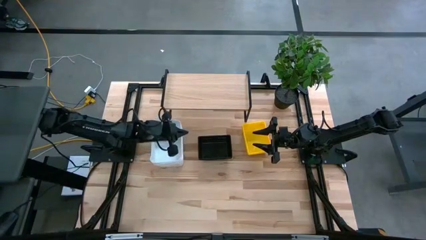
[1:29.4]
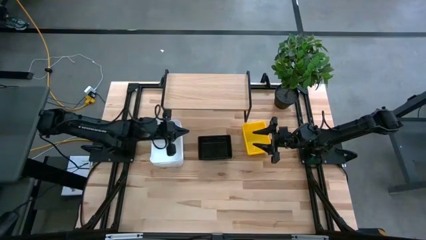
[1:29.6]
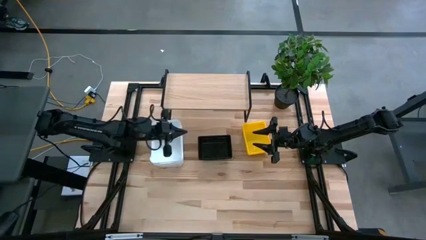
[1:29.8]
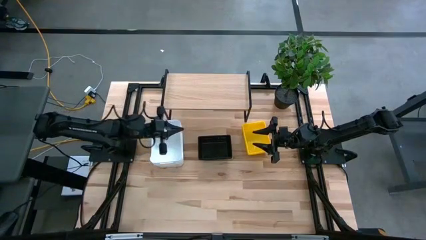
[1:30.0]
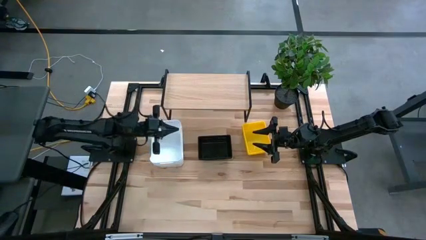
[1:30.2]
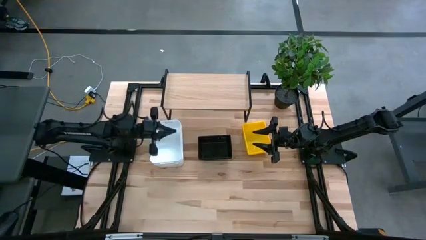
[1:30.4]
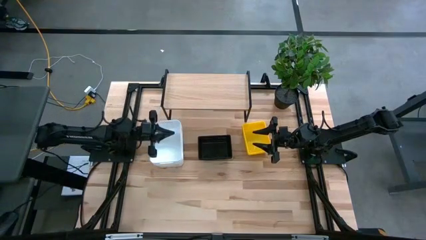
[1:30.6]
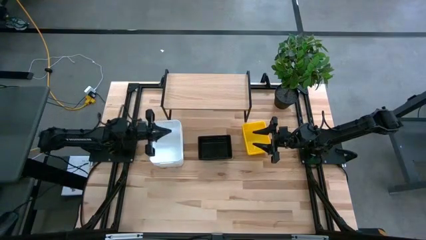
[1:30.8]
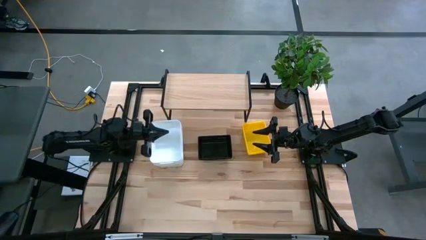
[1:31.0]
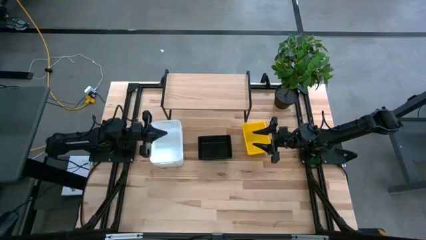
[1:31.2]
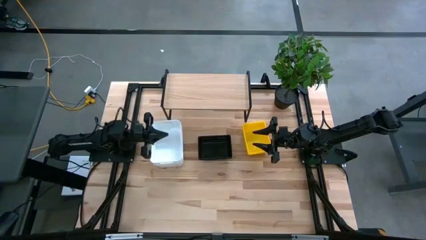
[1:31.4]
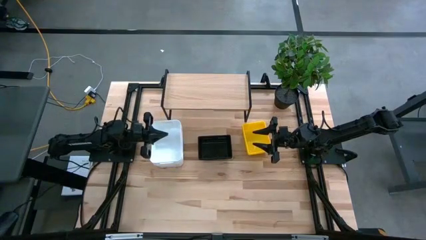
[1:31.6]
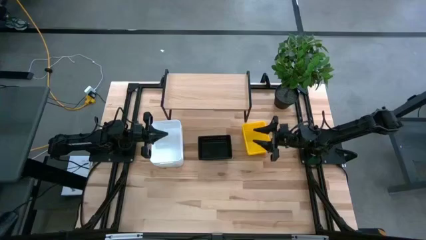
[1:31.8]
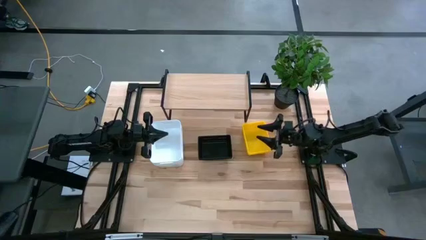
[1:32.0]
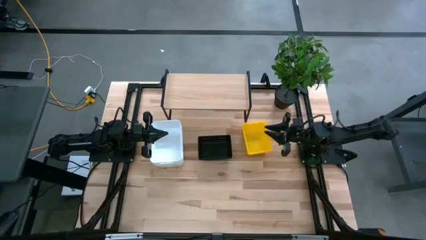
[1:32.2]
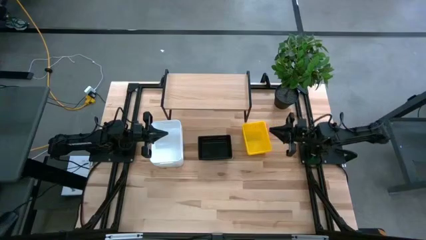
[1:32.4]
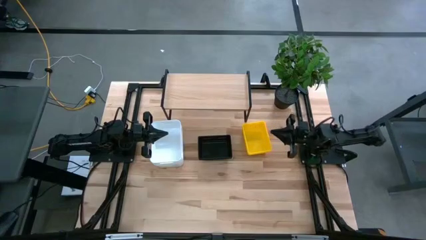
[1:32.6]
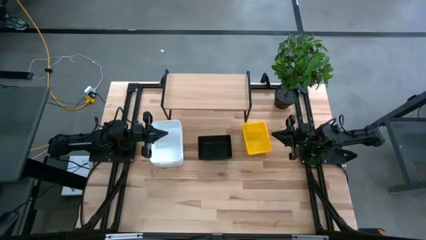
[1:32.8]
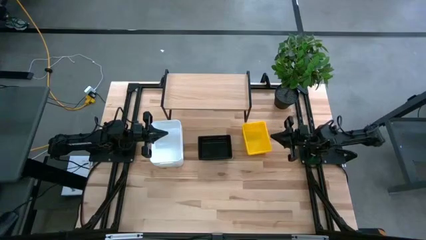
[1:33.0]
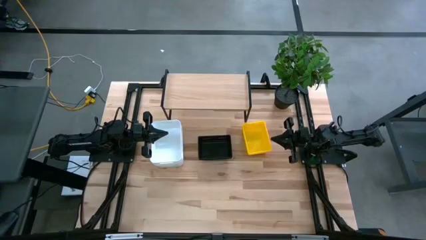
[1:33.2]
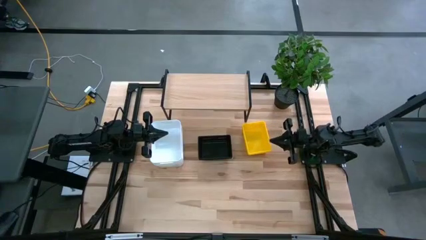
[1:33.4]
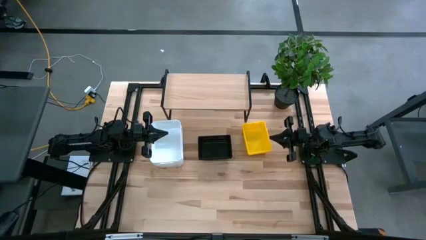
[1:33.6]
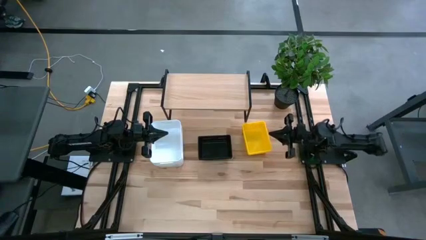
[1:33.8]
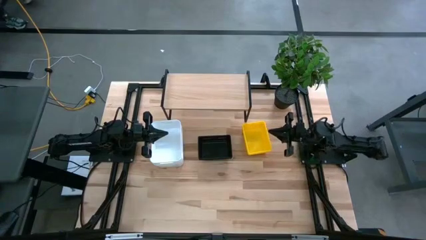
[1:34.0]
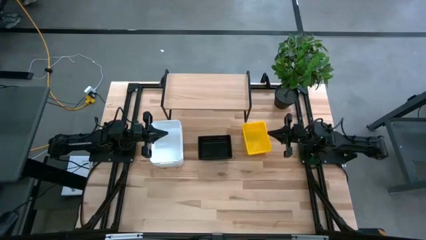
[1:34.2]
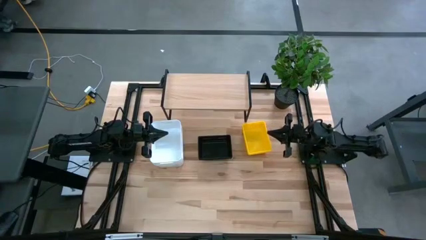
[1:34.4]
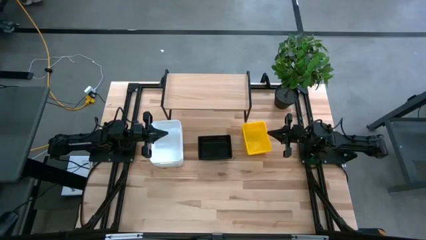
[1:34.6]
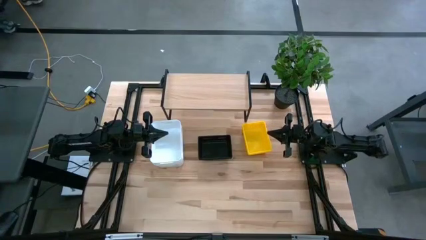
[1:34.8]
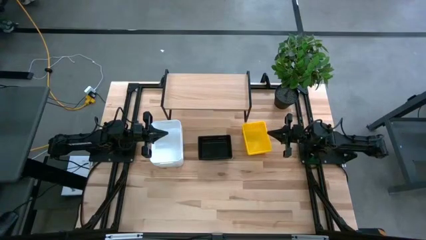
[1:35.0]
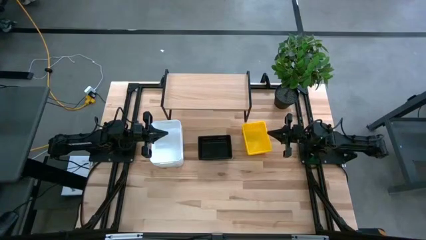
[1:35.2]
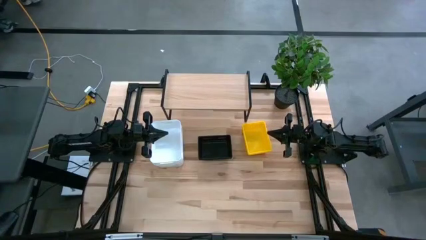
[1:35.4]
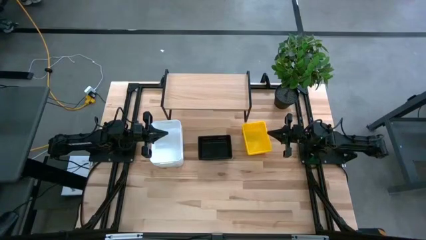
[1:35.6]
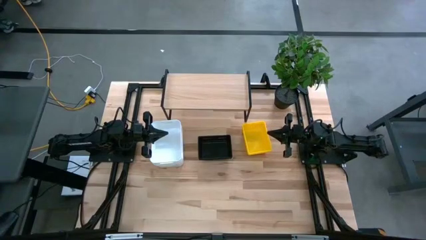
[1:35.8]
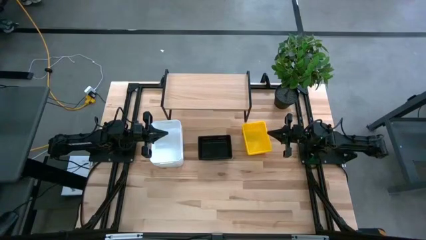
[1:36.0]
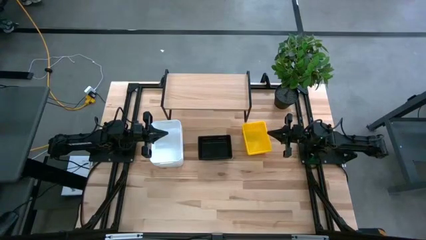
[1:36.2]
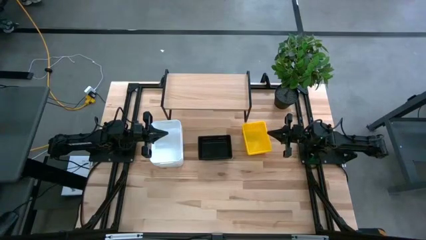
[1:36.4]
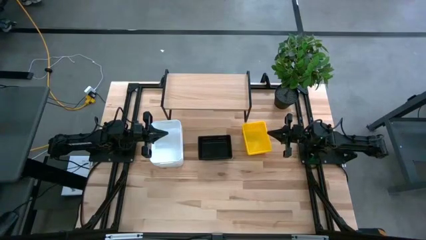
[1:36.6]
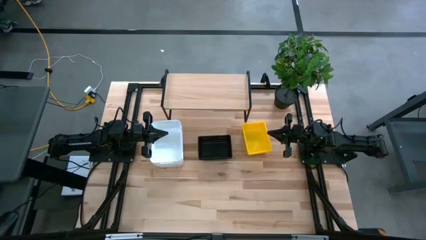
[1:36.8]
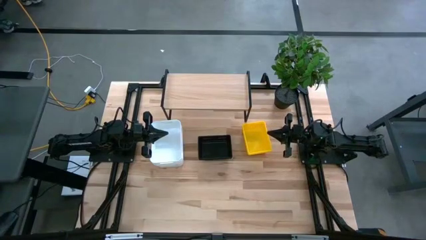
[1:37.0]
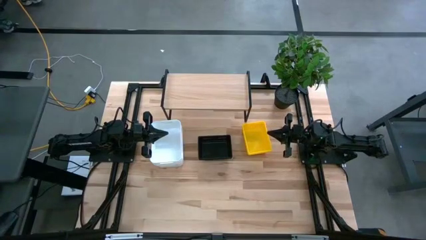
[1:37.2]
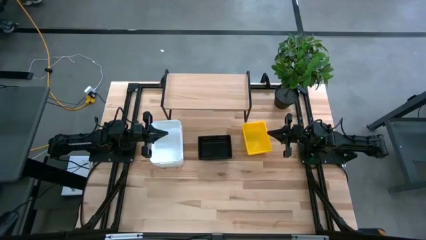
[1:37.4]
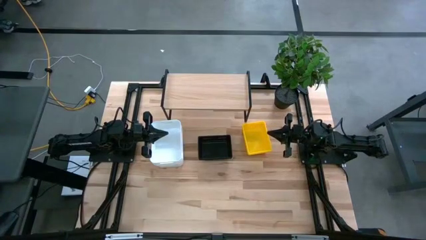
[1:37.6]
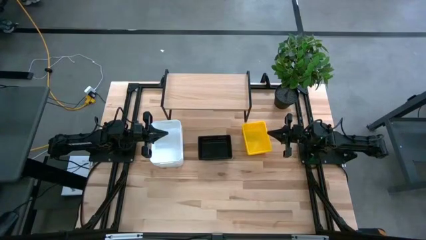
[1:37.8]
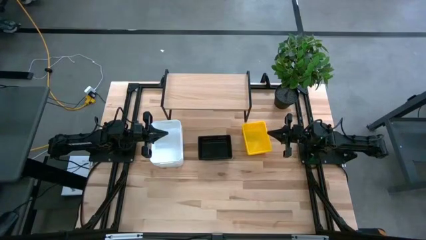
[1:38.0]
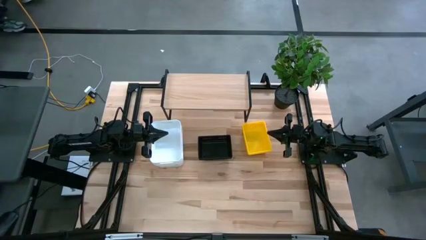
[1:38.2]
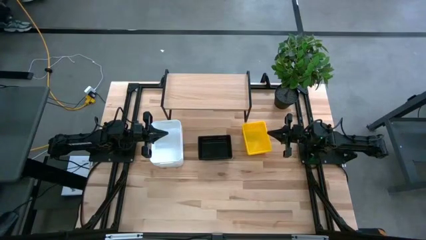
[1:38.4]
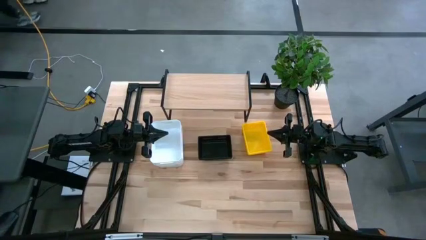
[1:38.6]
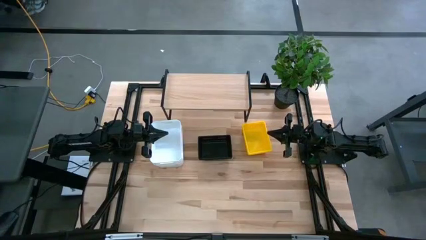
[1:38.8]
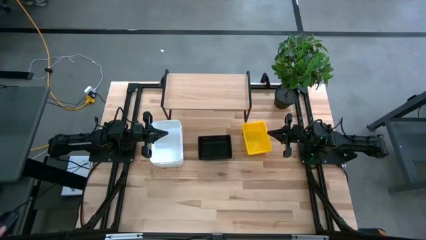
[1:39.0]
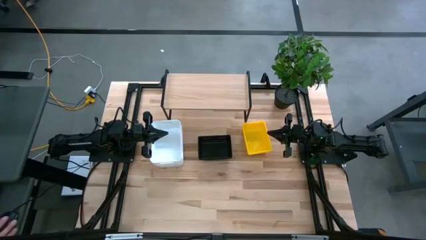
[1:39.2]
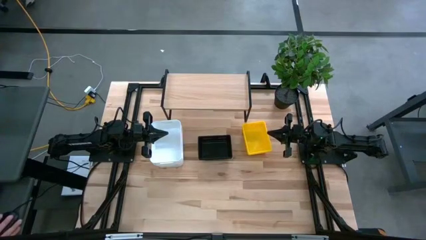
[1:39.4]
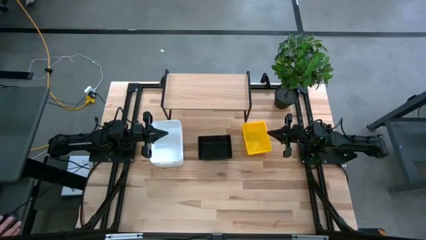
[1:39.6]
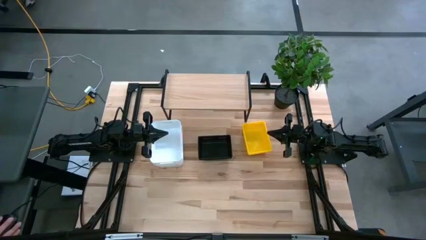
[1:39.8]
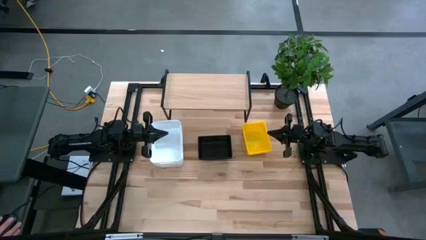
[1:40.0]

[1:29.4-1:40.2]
Task: Stack baskets on shelf by color
Return to Home Position
